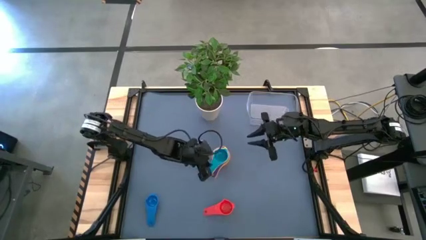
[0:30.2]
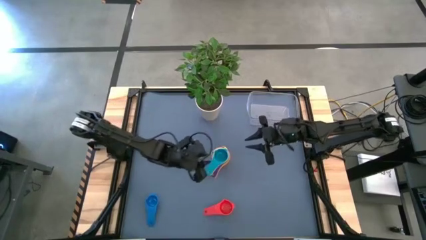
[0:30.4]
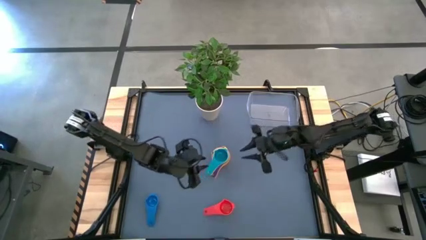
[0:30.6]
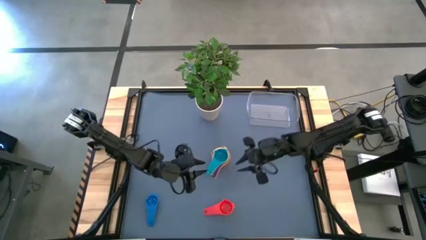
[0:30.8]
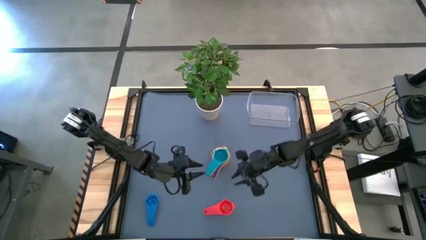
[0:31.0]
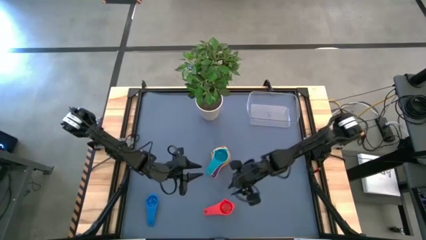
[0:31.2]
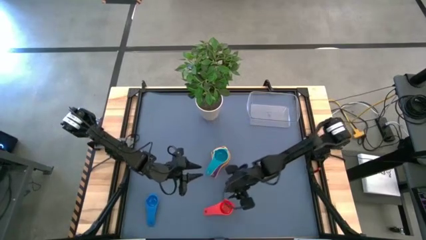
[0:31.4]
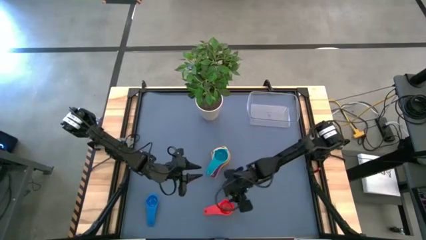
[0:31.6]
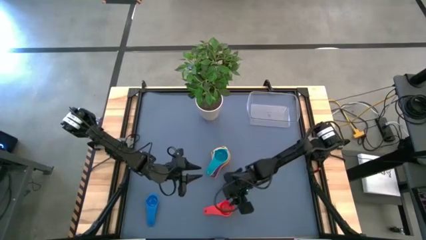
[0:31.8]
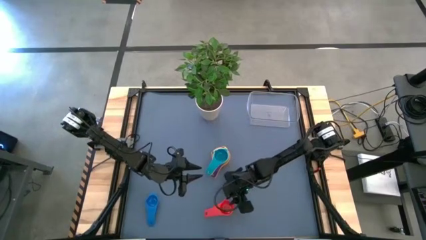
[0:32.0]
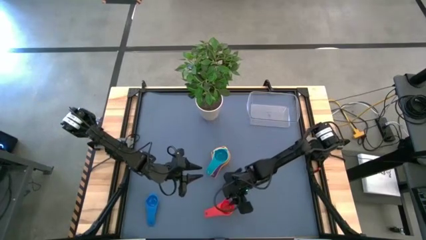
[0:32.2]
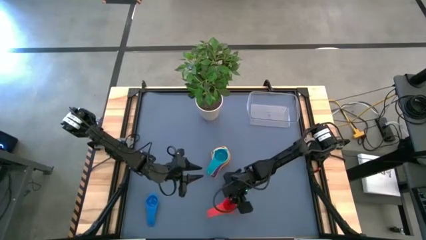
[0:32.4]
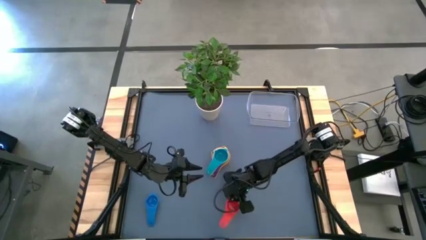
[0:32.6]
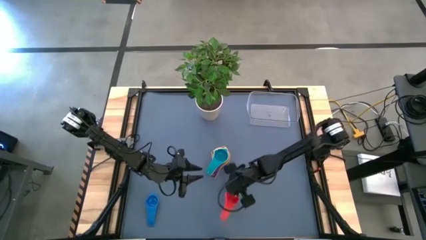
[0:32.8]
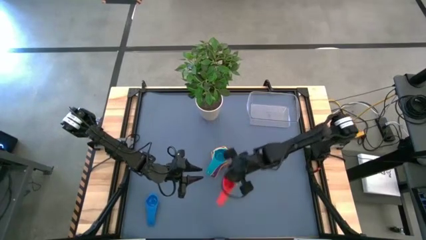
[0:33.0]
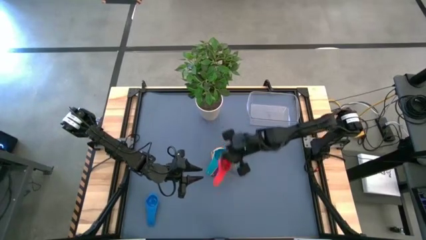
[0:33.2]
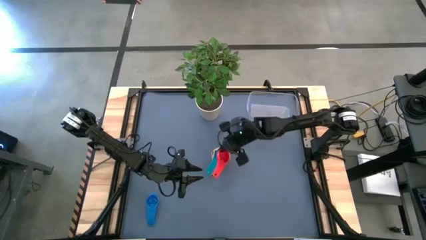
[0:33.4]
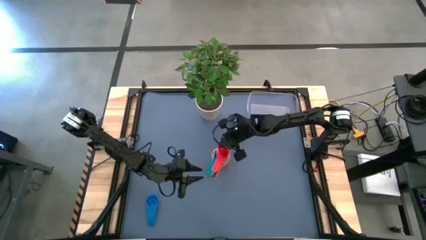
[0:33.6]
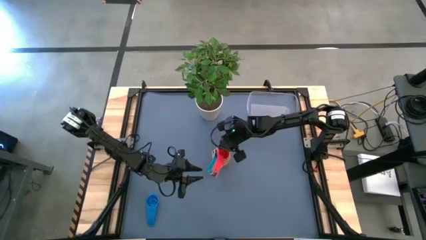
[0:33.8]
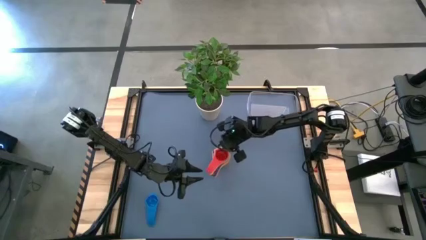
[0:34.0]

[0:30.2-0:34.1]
Task: Nest measuring cups in basket
Stack the red measuring cup on top of the light blue measuring cup

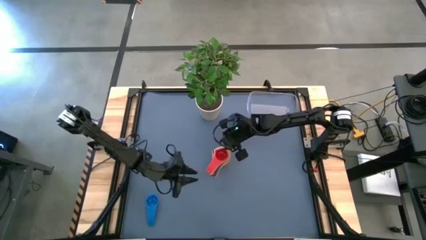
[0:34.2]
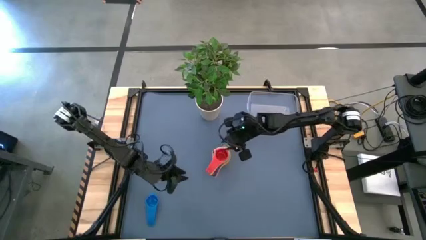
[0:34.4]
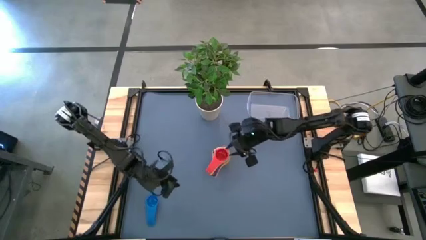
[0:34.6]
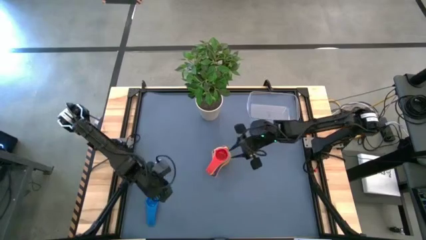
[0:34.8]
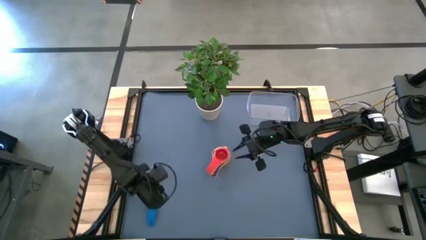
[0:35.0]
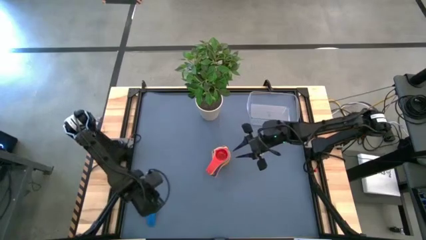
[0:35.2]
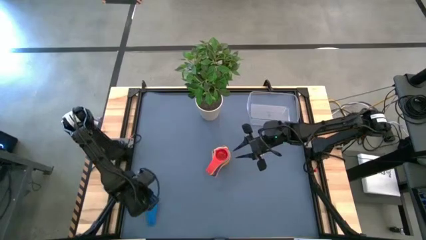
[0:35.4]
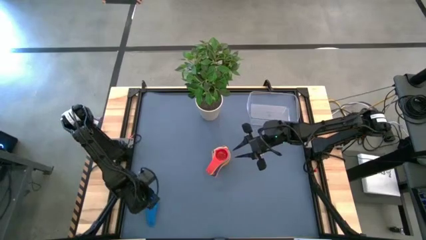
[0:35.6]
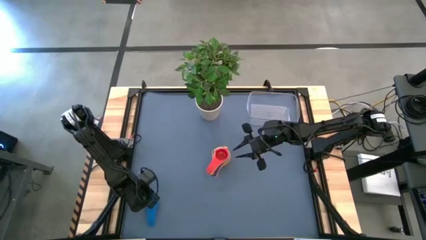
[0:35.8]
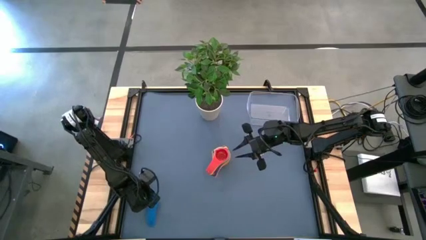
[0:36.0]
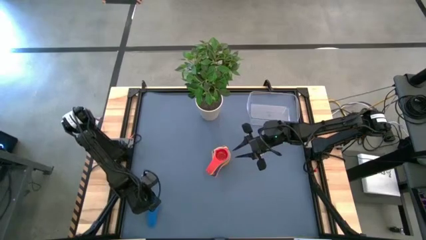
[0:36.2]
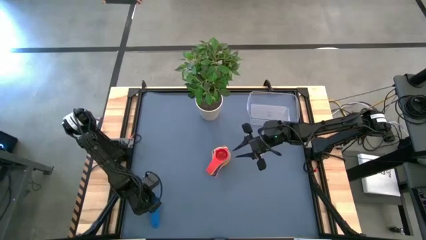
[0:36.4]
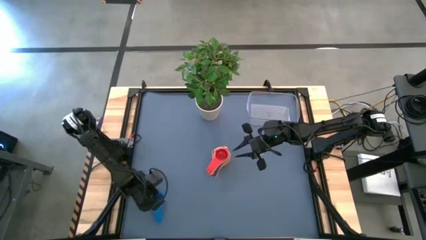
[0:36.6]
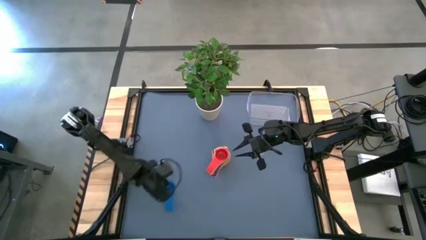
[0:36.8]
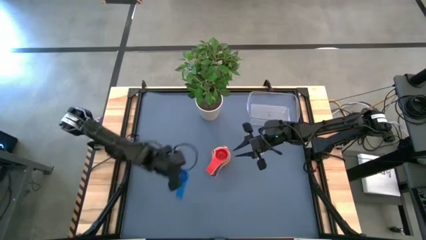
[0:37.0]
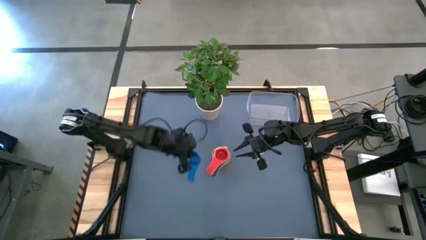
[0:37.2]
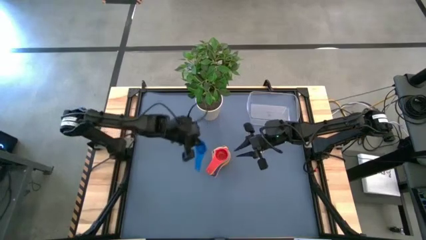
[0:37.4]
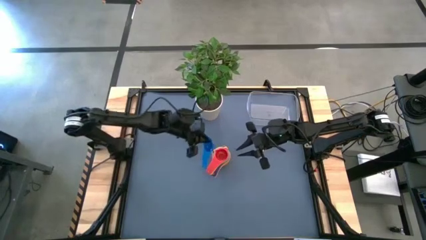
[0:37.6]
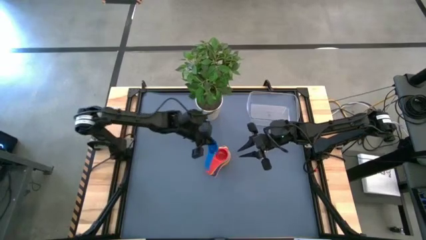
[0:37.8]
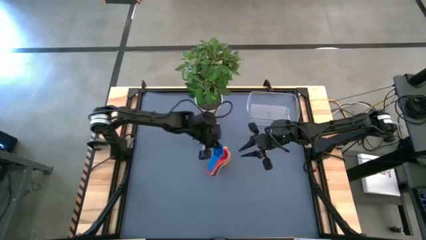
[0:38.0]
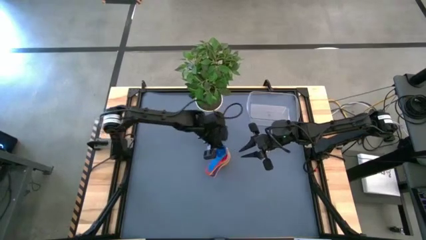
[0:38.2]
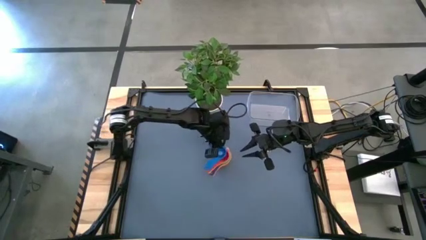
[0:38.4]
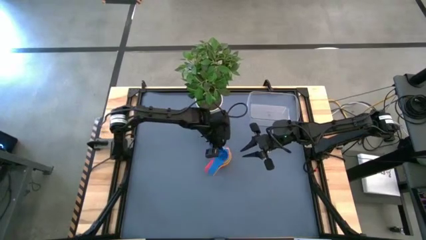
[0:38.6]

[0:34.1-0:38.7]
Stack the dark blue measuring cup on top of the red measuring cup

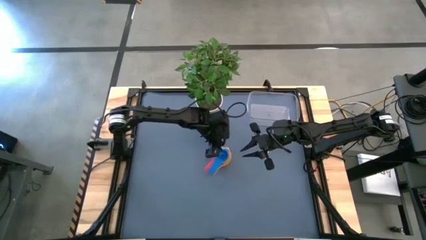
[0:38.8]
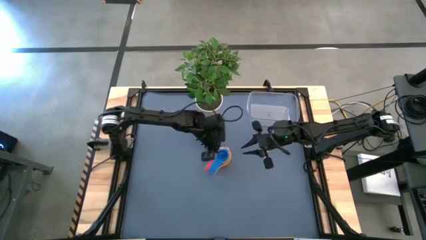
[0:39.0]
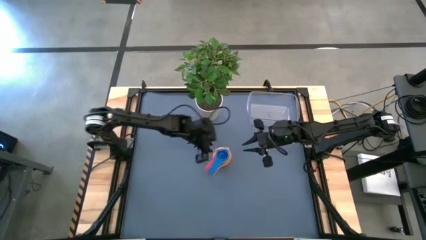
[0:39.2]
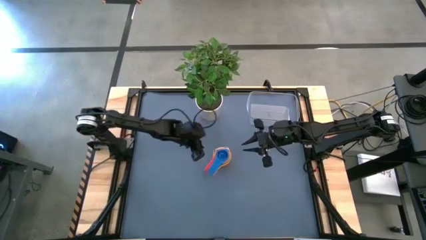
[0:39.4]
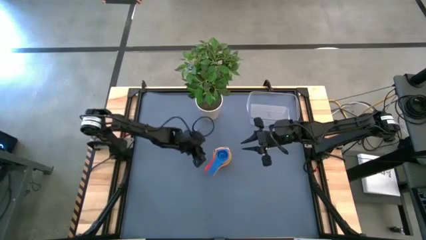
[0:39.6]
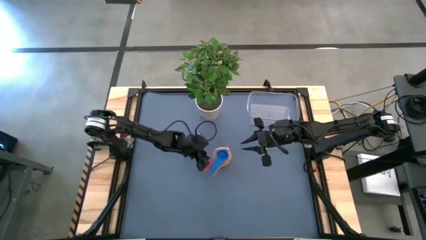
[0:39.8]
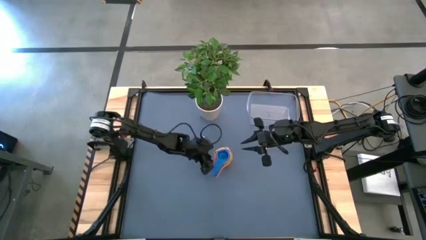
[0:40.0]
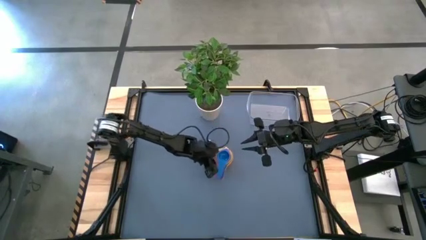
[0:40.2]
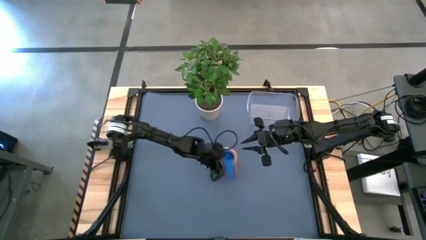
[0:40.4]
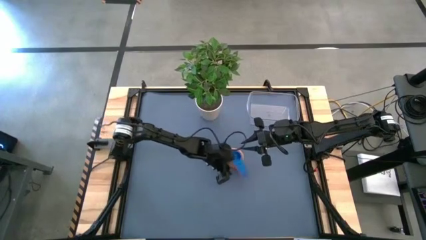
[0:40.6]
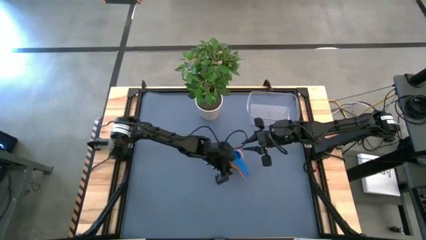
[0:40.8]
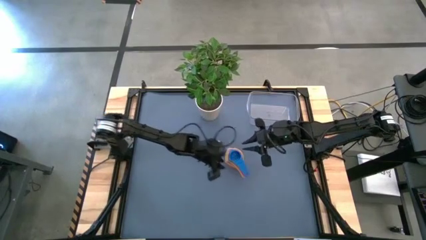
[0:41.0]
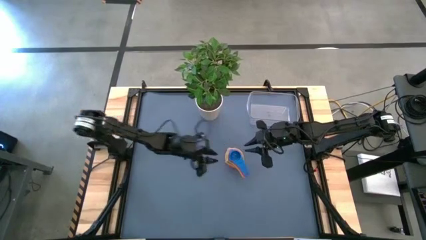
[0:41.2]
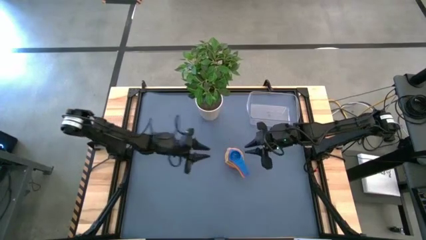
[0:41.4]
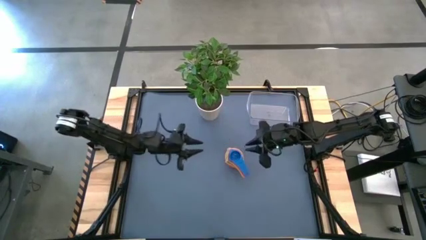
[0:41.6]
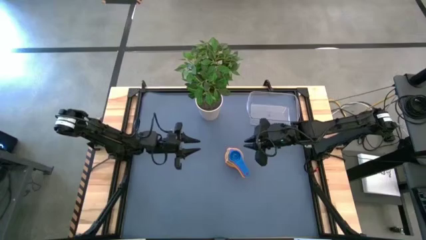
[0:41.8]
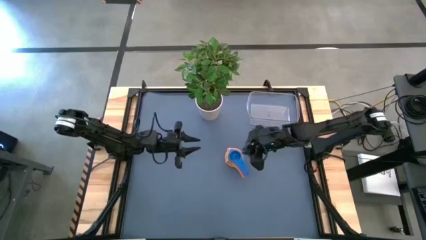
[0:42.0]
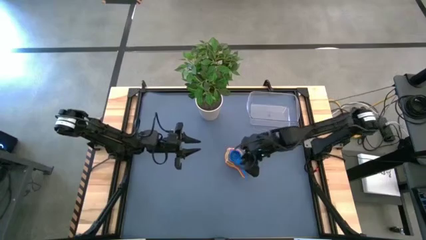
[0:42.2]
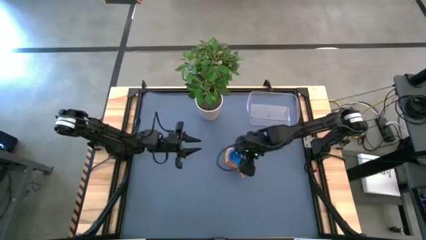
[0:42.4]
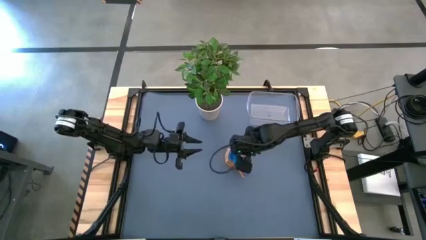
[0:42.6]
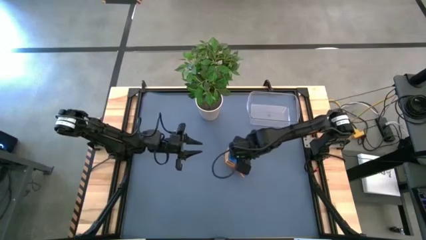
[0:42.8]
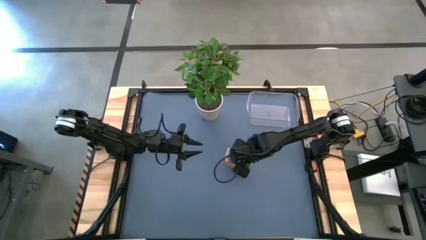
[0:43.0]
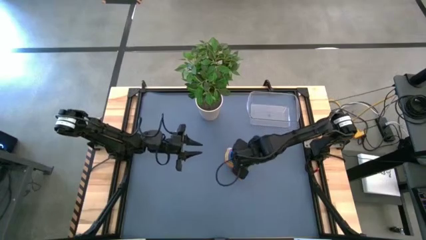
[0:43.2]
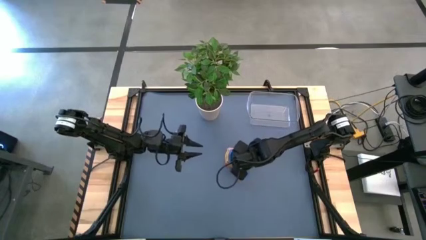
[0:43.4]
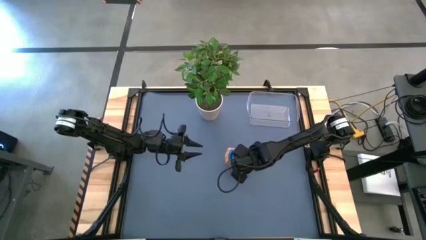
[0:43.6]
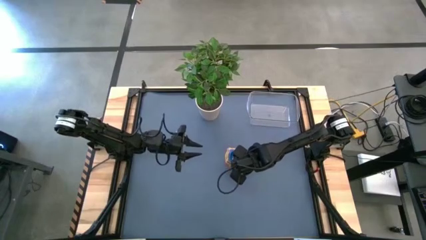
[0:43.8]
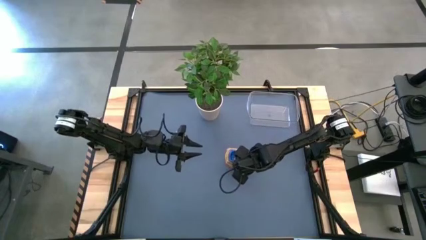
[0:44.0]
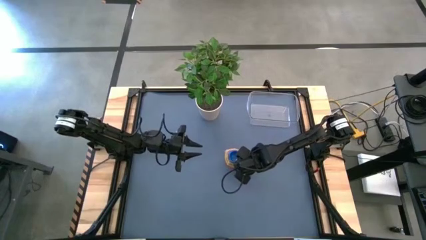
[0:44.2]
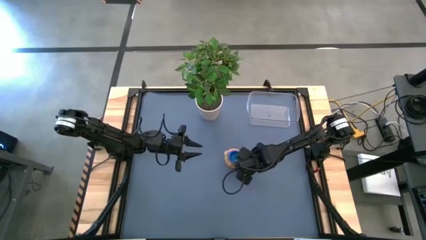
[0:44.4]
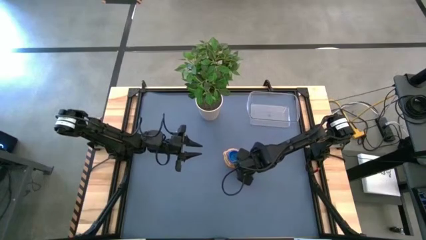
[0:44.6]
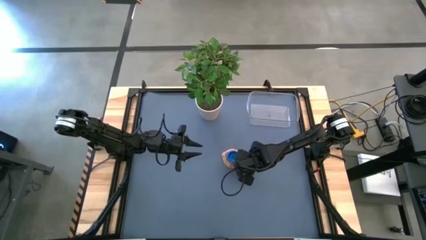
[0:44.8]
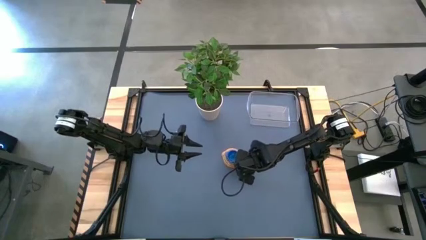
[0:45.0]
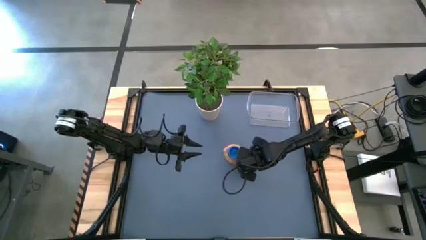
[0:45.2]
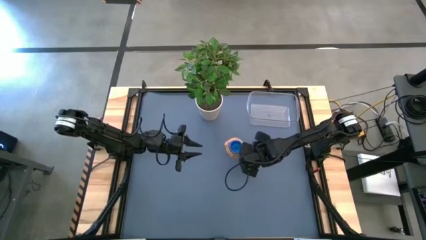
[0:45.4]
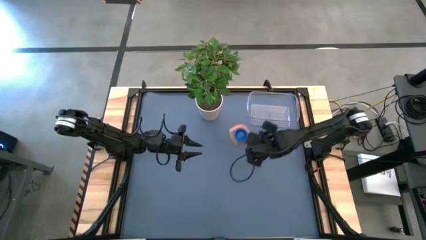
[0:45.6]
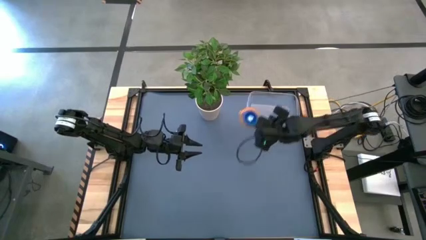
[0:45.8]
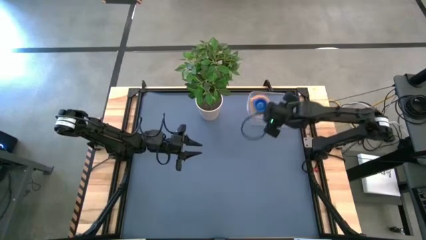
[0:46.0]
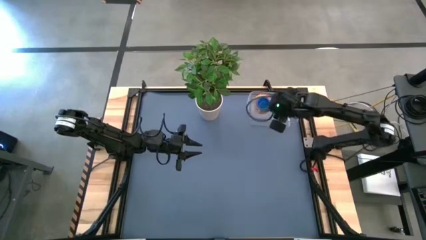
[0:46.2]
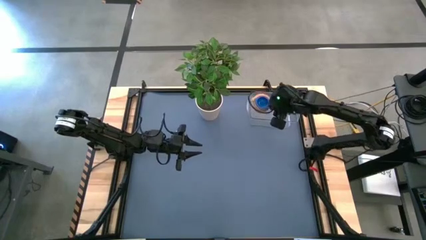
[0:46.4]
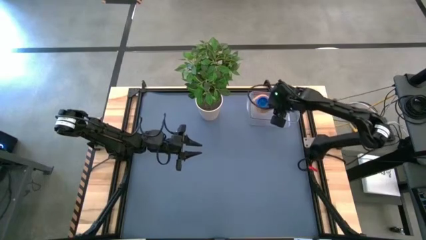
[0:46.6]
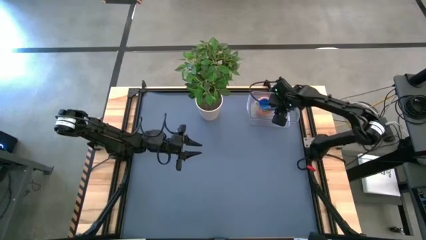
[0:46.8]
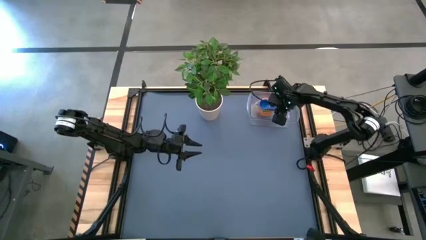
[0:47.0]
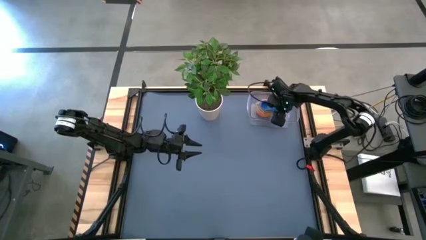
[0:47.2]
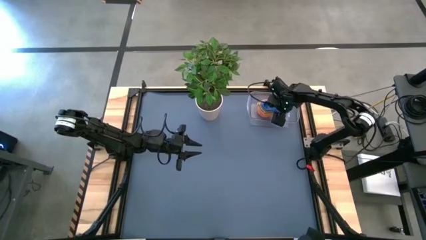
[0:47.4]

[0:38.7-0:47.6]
Put the nest measuring cups into the transparent bin
